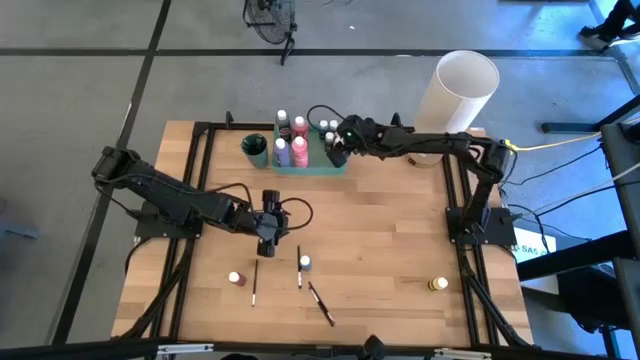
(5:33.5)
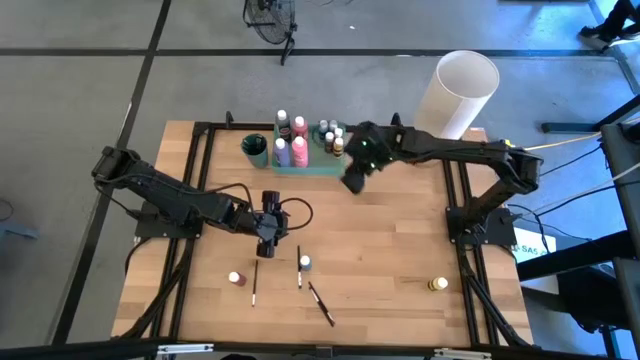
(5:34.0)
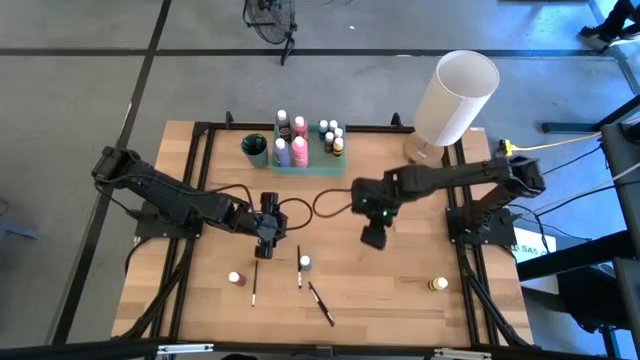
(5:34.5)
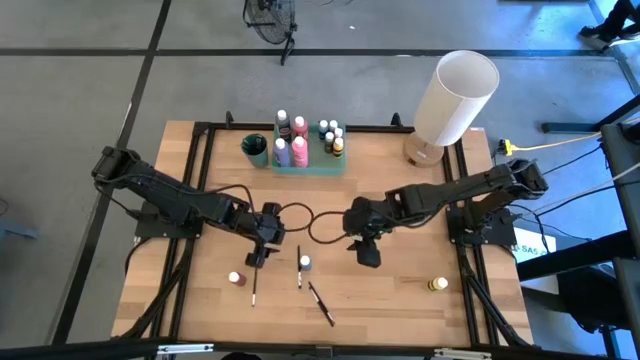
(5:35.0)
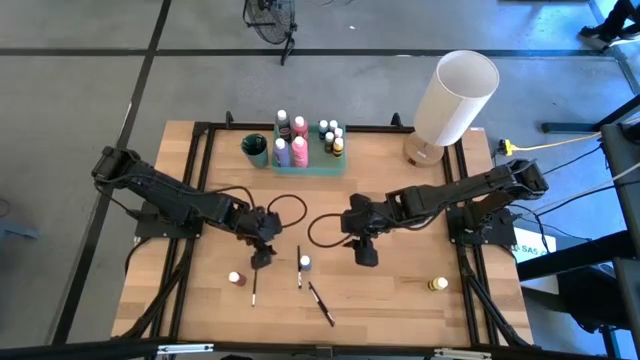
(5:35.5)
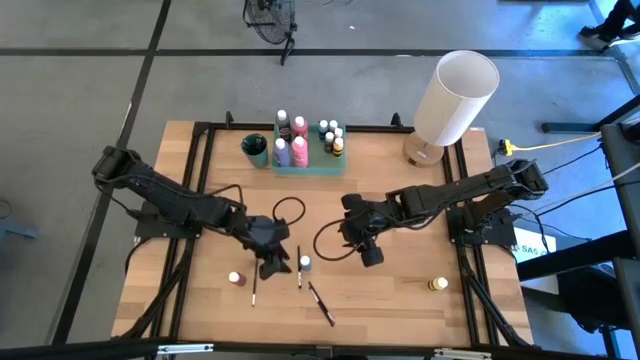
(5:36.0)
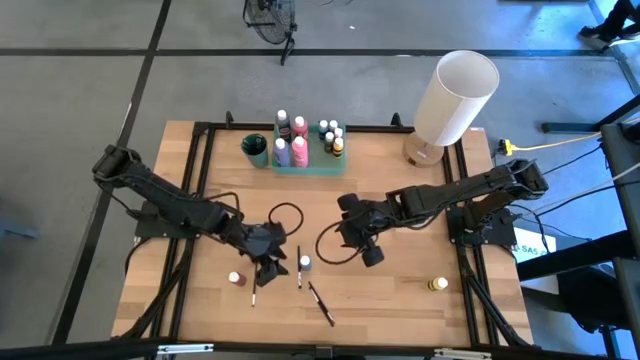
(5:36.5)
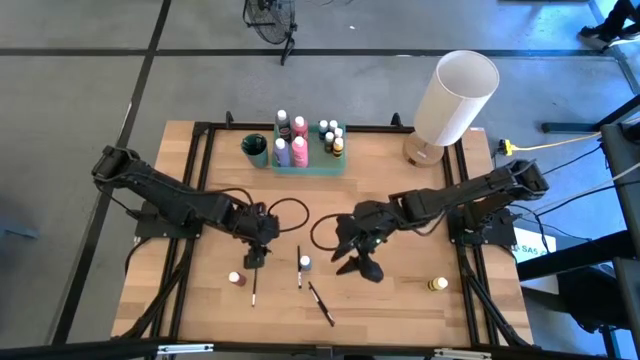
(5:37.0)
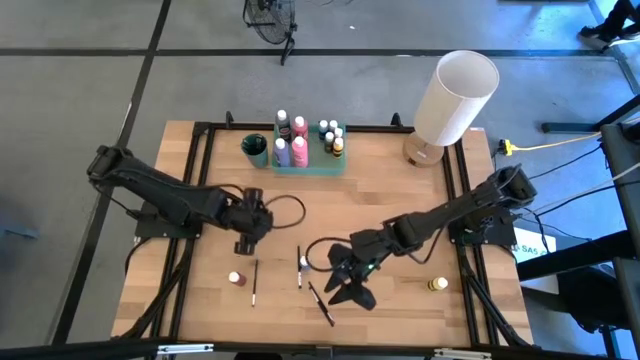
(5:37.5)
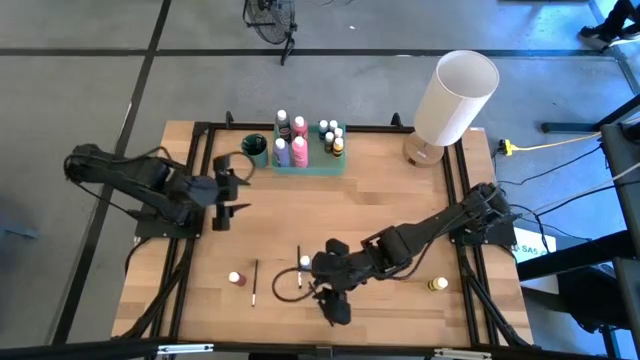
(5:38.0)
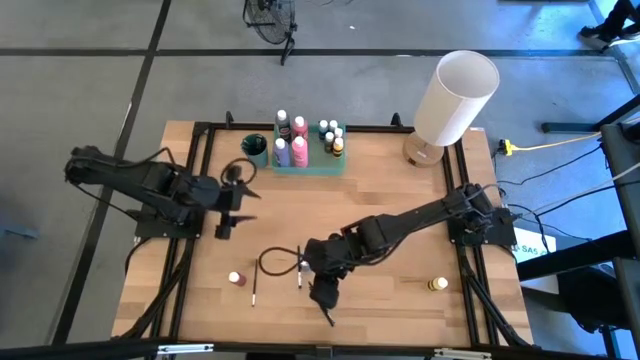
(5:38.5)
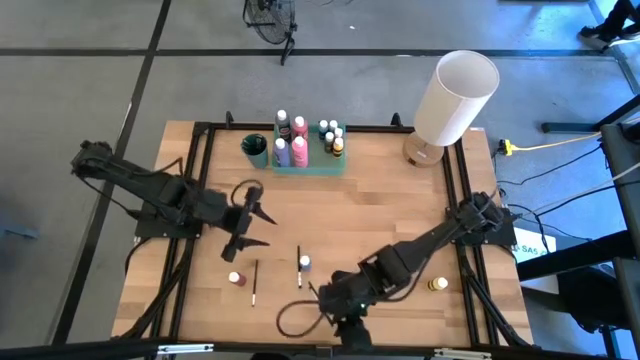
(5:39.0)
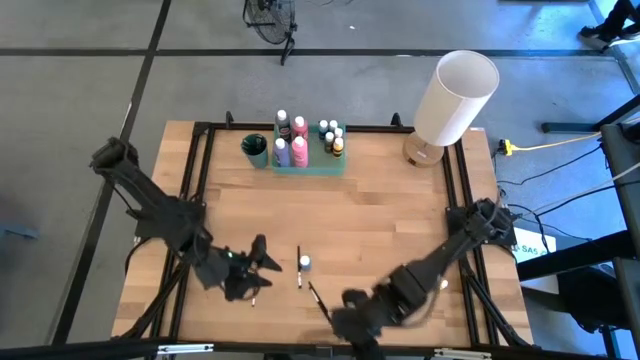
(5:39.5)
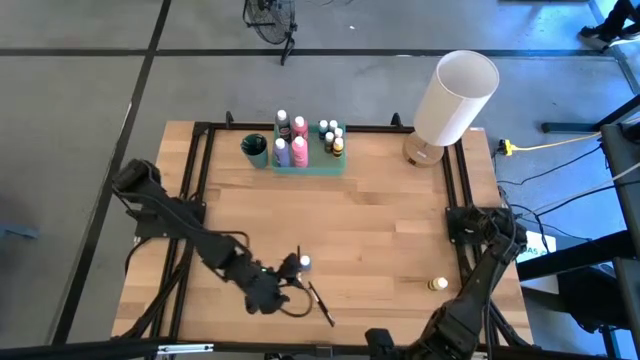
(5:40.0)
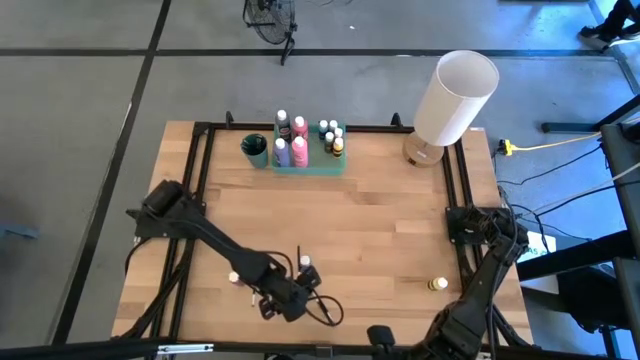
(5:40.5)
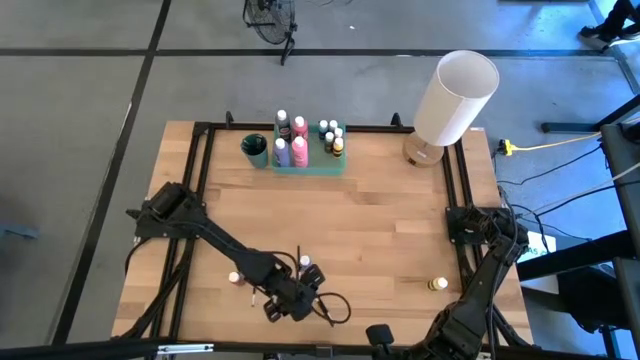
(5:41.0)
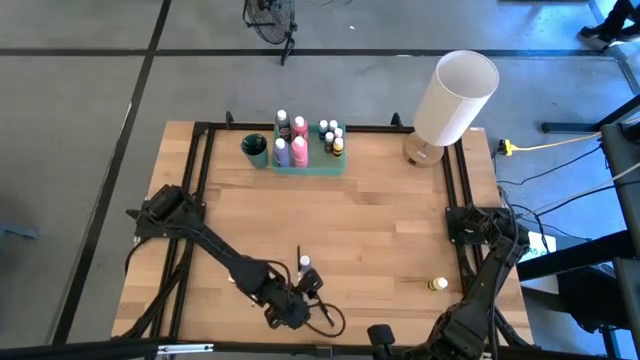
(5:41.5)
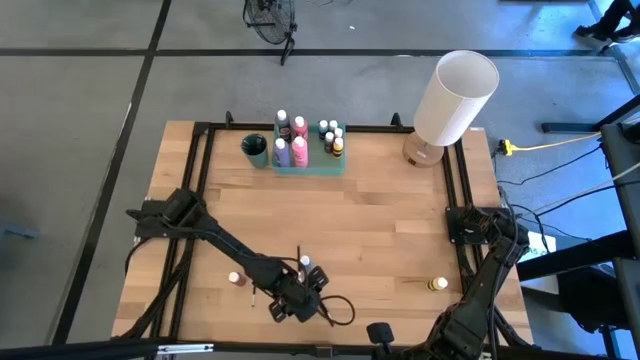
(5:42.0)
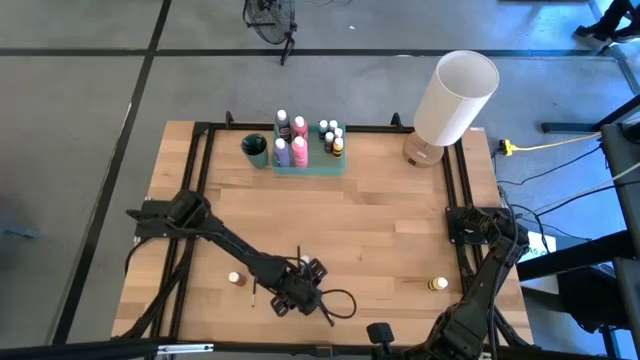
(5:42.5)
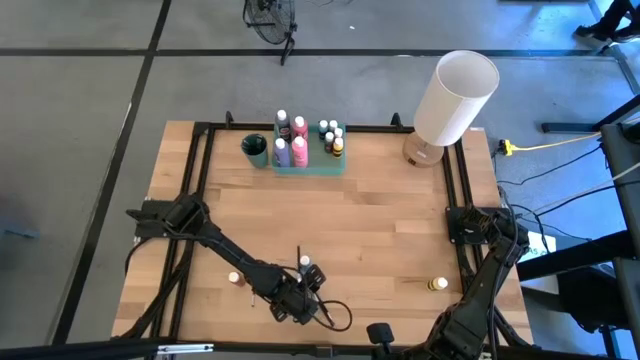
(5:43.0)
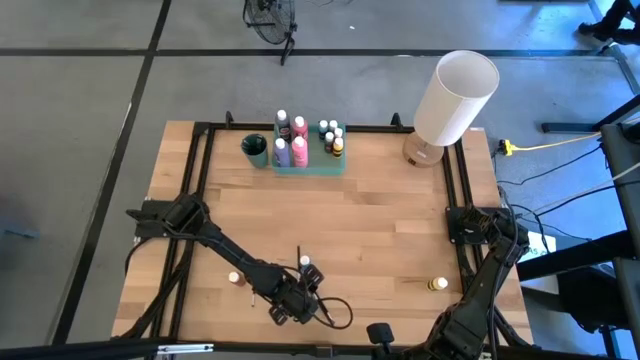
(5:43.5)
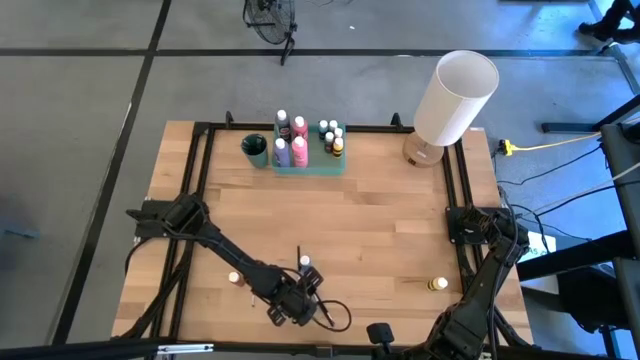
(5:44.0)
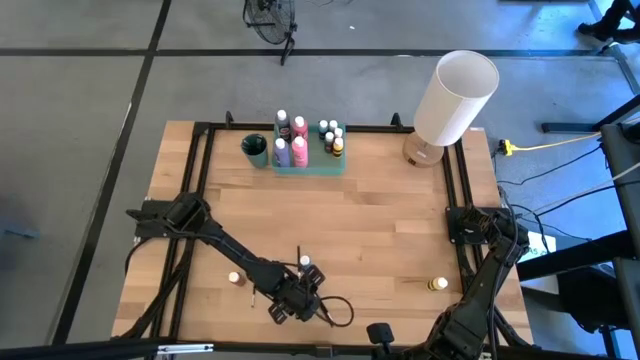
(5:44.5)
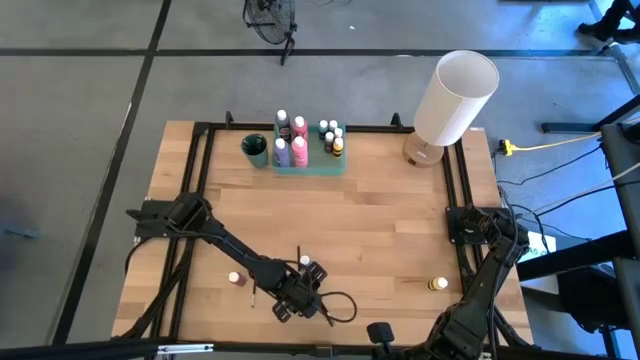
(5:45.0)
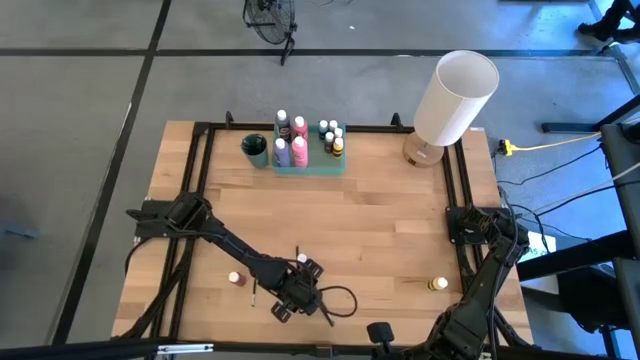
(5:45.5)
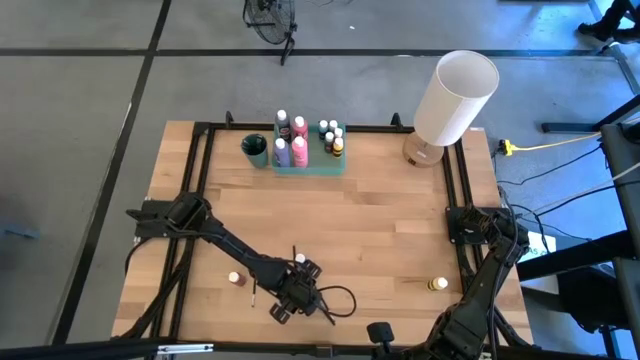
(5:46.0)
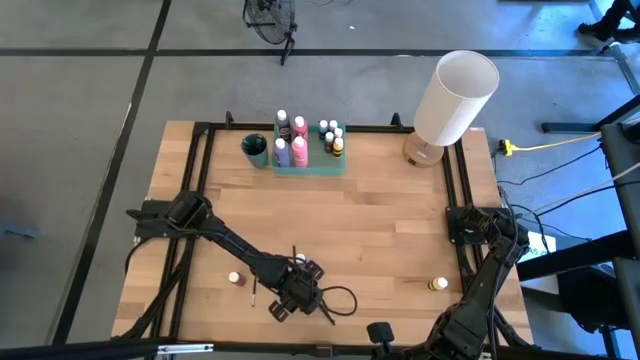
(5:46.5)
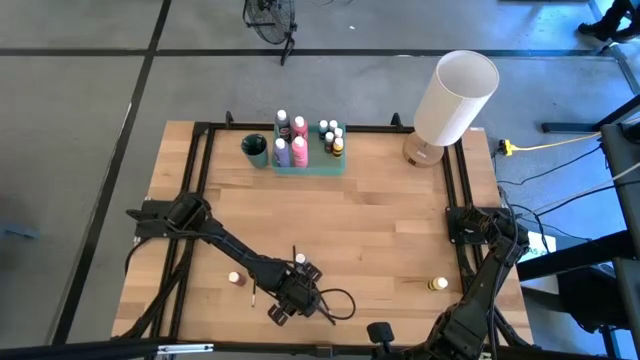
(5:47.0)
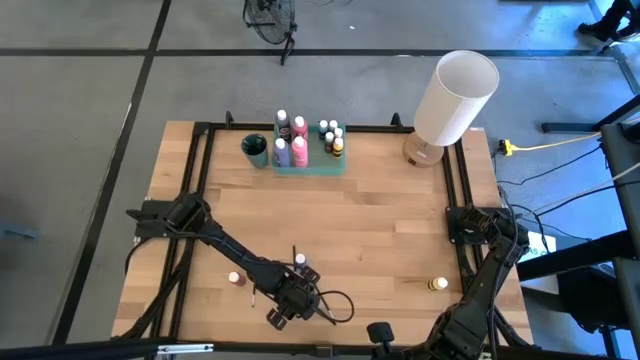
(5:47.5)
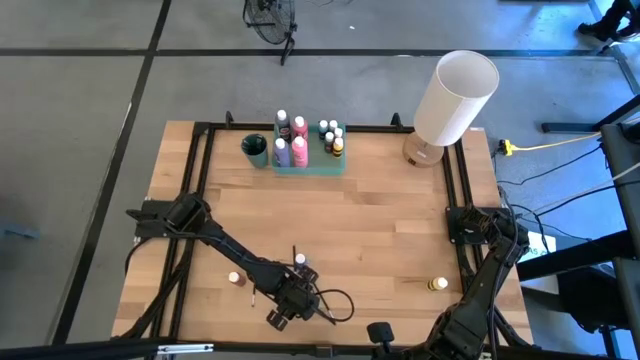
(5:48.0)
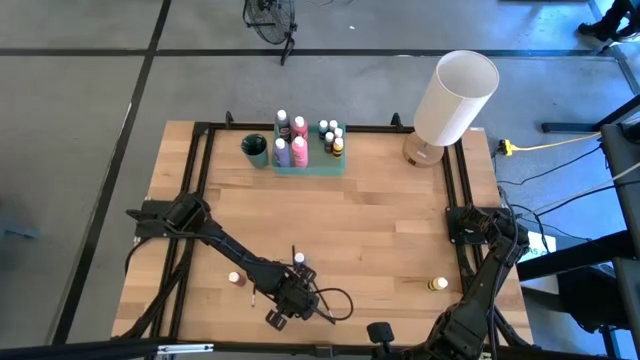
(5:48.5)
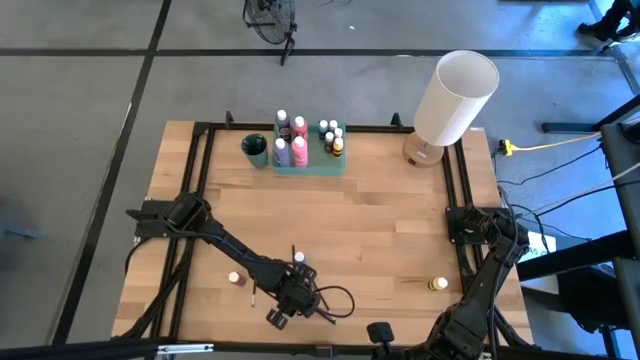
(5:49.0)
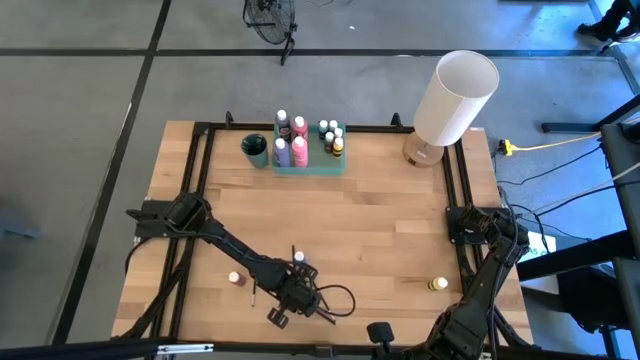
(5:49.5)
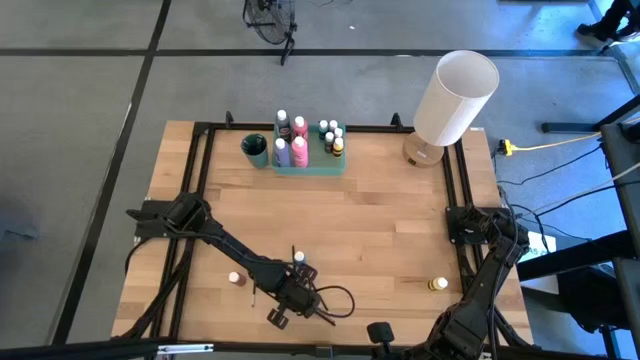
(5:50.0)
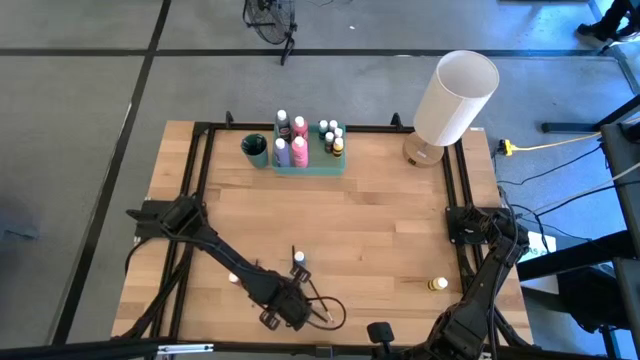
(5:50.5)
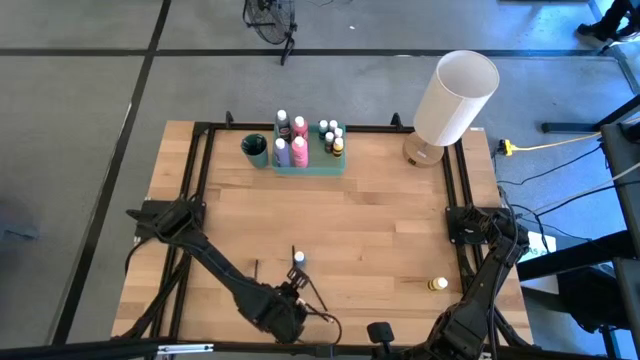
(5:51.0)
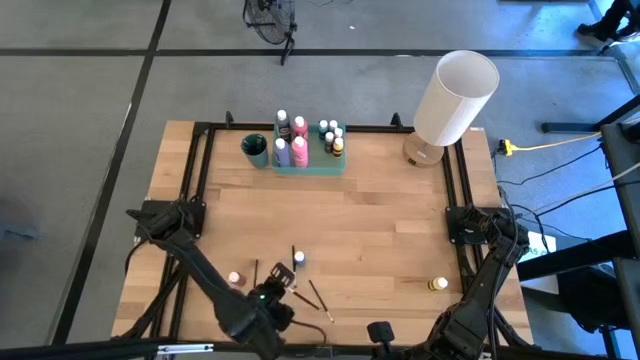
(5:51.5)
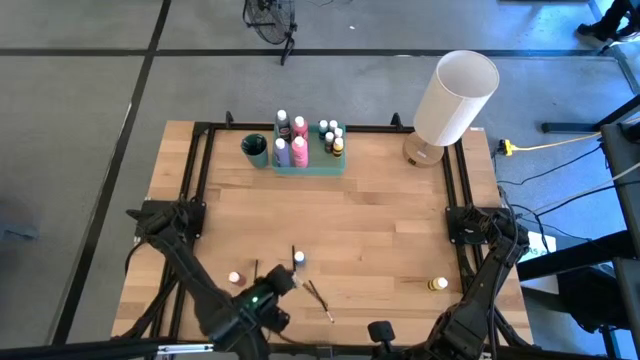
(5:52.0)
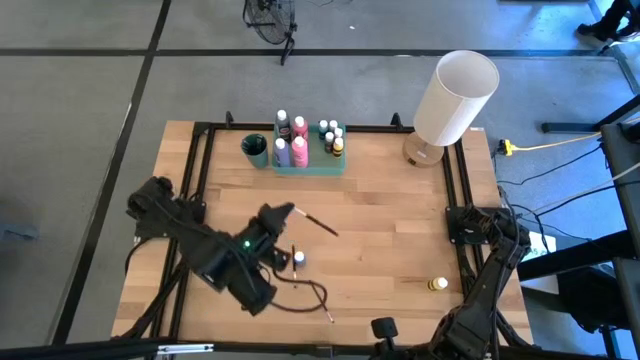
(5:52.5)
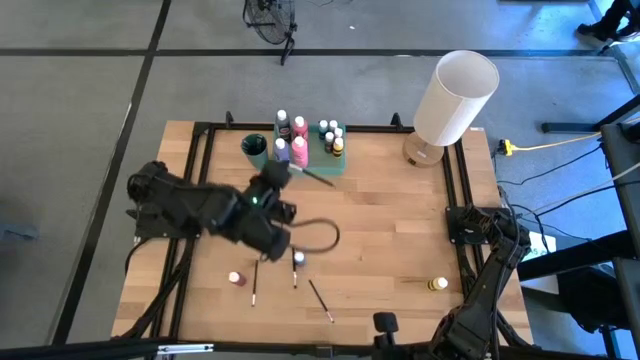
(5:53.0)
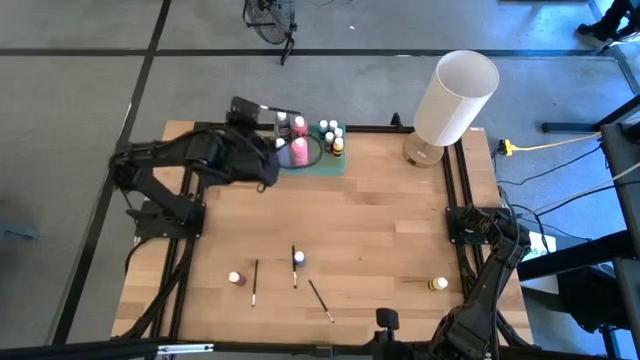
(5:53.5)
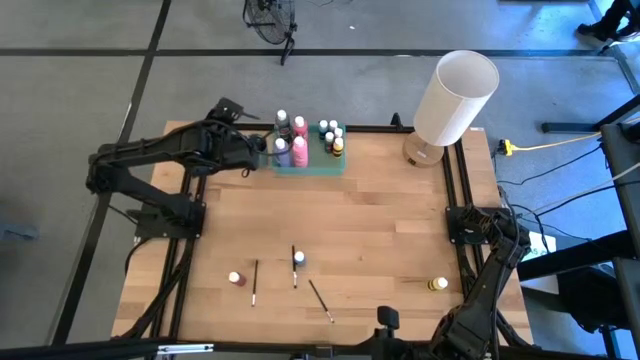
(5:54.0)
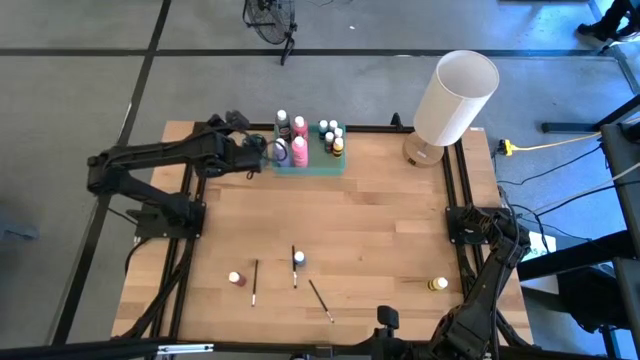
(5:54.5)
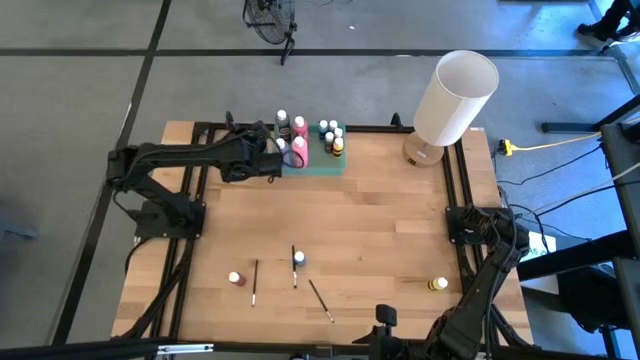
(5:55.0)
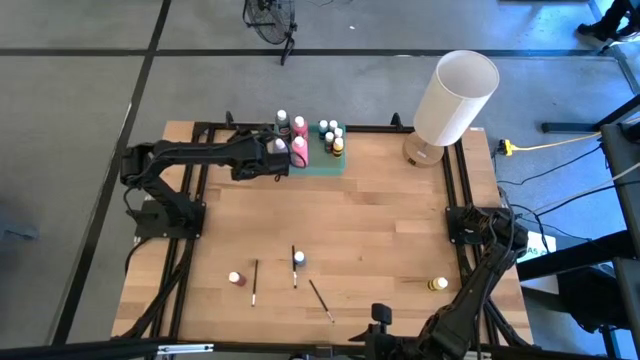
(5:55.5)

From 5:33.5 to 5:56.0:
Task: Pick & Place Paint Supplies
Put the silver paintbrush into the green cup
